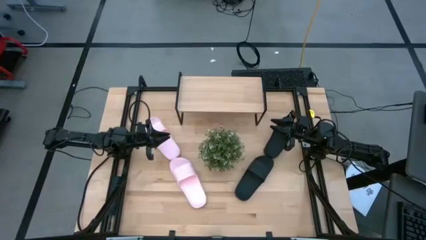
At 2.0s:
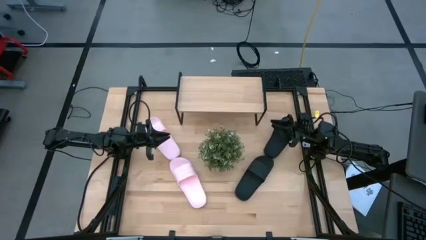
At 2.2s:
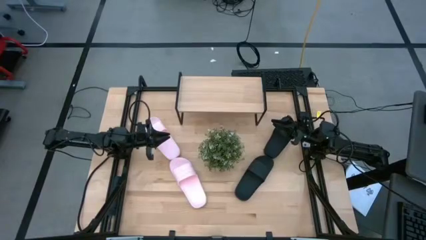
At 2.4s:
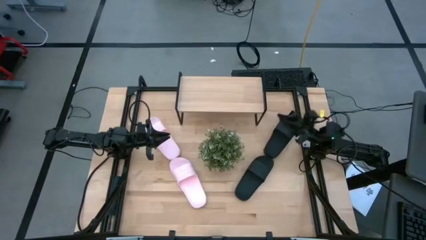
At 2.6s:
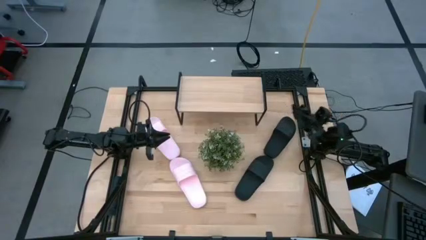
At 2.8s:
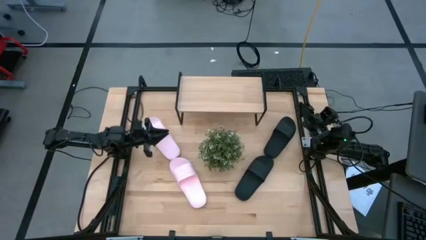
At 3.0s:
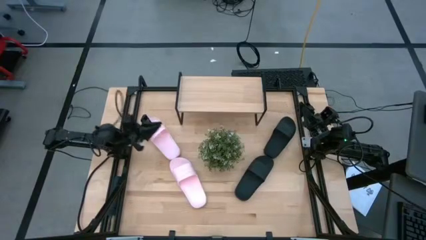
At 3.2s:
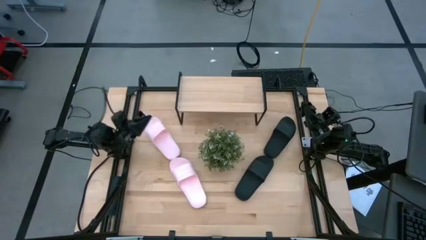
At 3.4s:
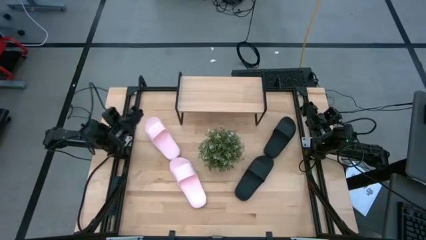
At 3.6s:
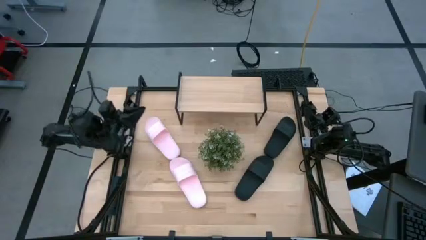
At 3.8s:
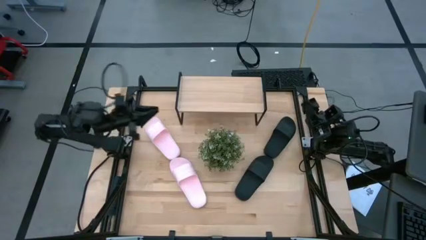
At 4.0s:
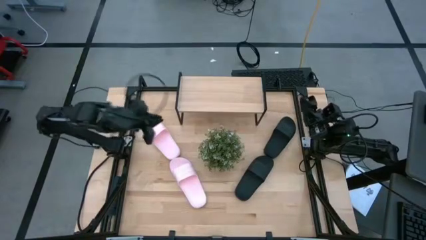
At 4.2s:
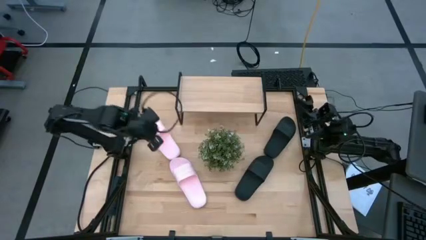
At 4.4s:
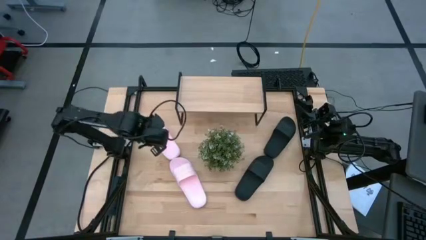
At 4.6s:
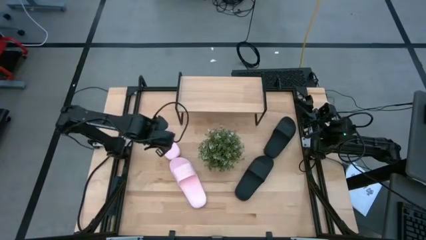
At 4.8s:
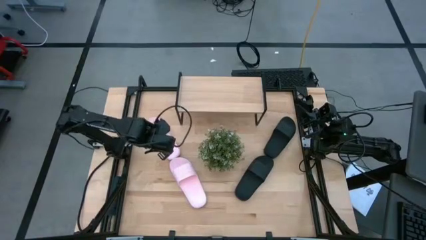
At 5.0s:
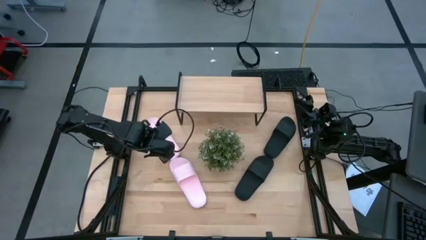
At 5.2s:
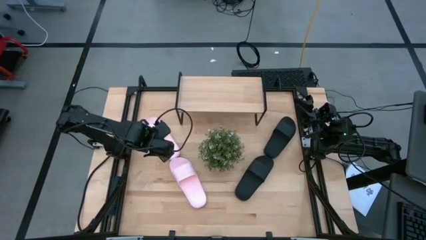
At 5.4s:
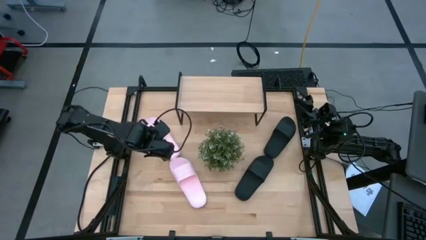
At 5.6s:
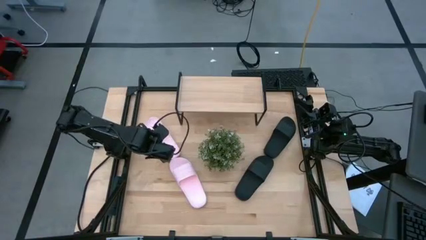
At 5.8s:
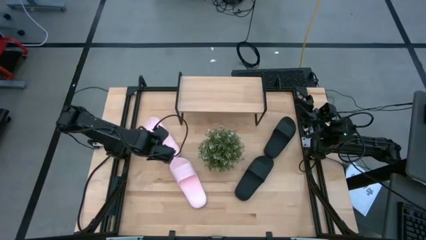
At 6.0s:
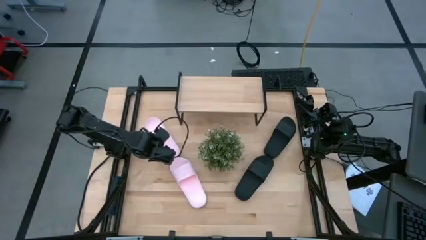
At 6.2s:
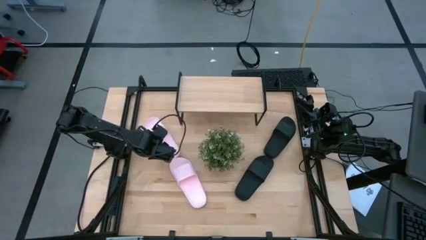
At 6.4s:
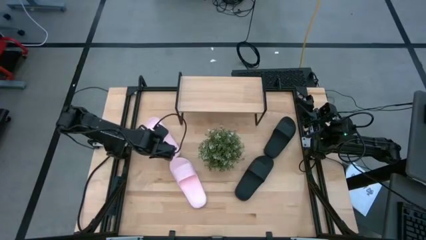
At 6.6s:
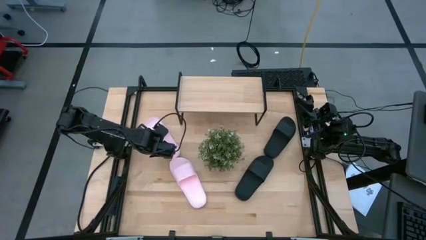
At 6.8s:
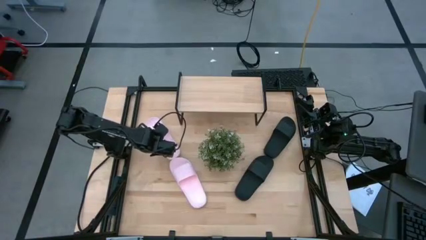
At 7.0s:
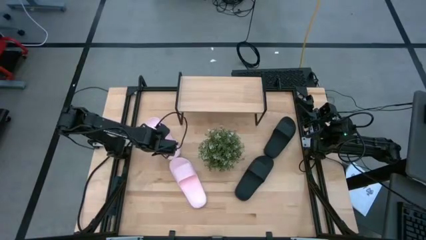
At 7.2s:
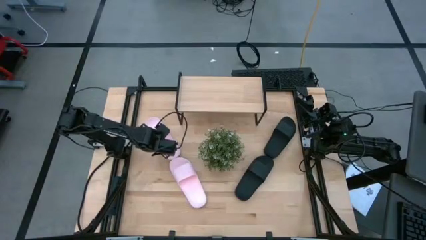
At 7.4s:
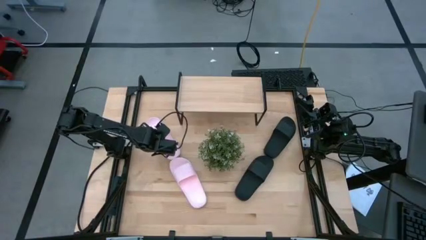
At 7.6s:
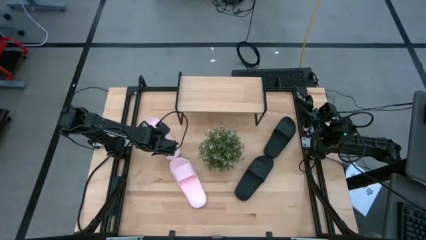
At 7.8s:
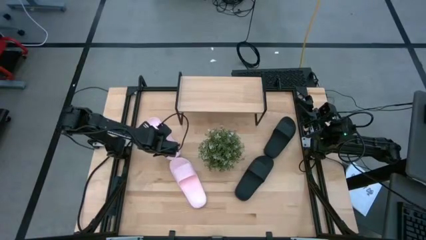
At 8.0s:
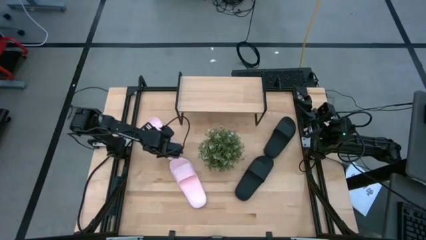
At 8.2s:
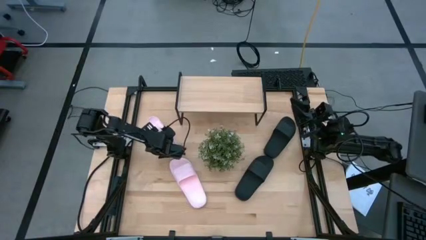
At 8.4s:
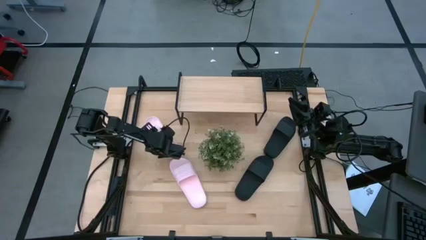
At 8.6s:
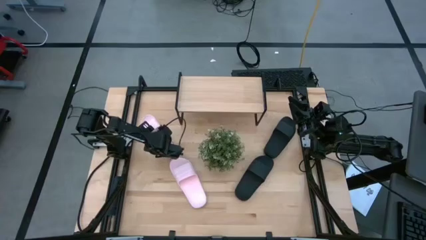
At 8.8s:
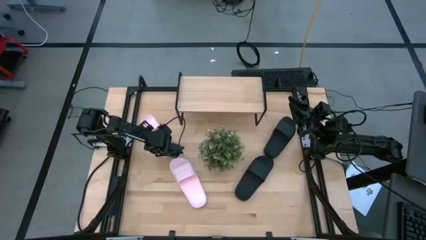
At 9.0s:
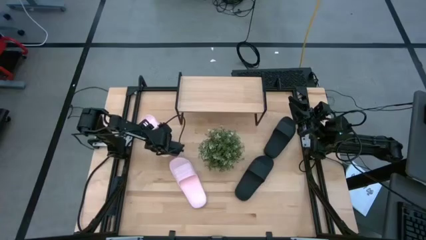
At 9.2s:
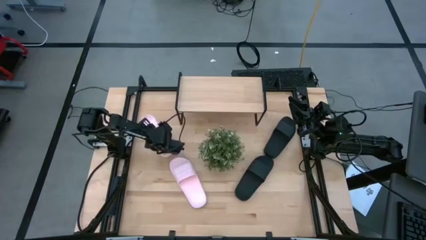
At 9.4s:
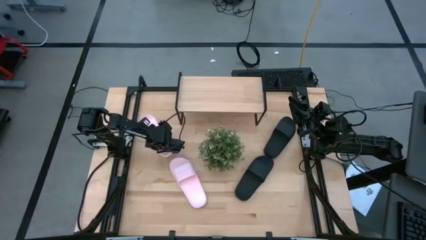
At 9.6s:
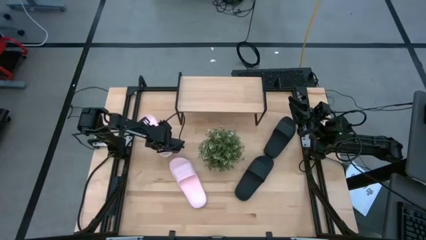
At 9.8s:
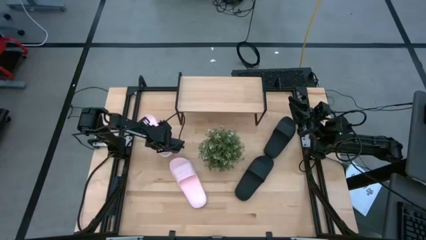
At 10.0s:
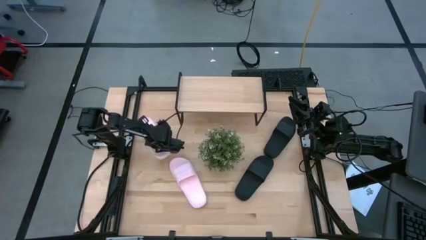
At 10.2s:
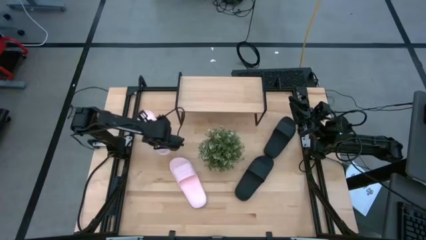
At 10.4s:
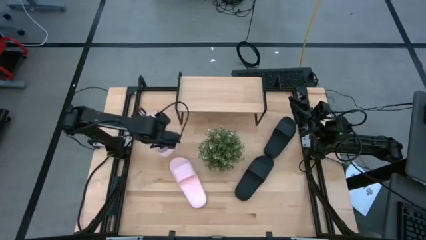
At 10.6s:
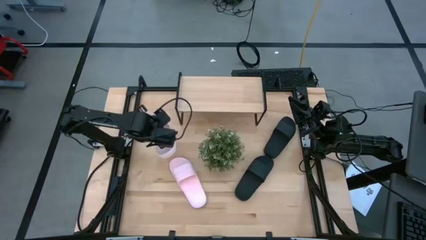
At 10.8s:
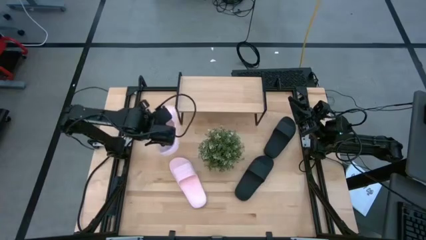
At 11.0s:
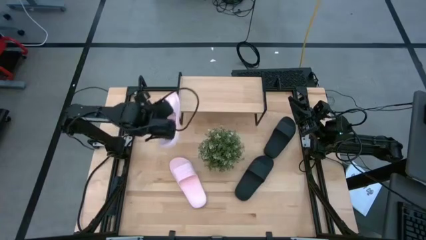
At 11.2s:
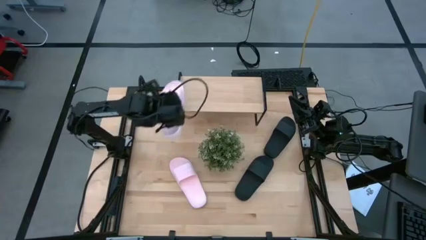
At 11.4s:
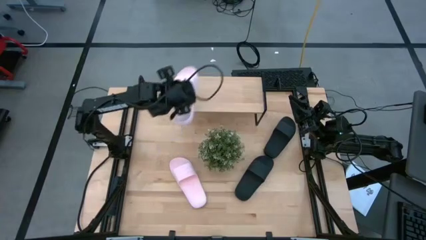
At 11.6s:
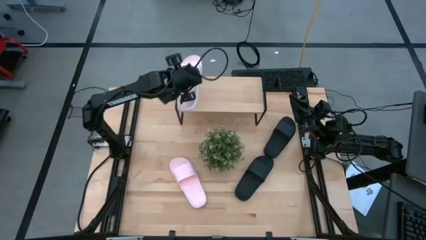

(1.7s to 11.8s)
Task: Pick and place slides into the shelf
Put the top pink slide on the shelf
